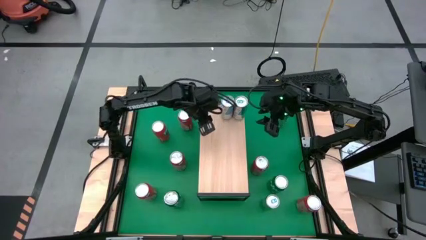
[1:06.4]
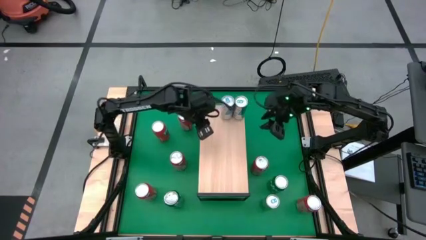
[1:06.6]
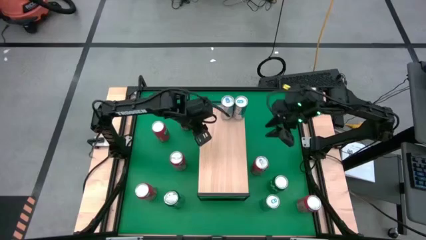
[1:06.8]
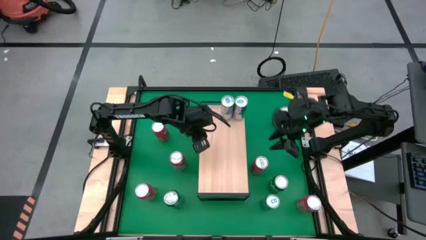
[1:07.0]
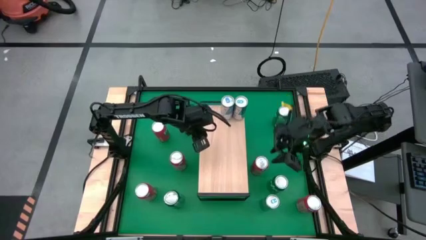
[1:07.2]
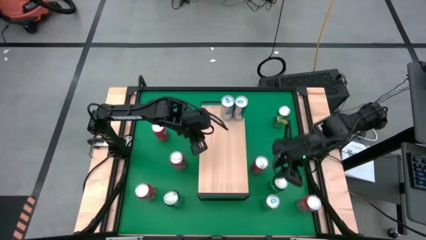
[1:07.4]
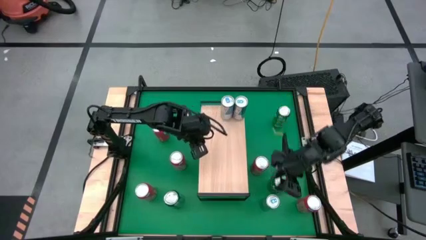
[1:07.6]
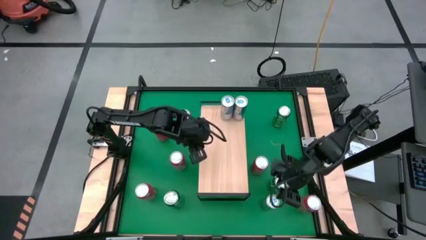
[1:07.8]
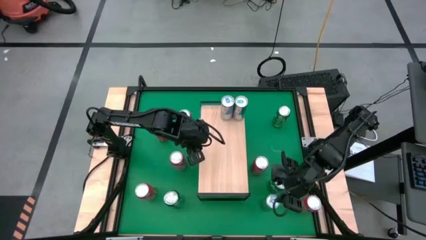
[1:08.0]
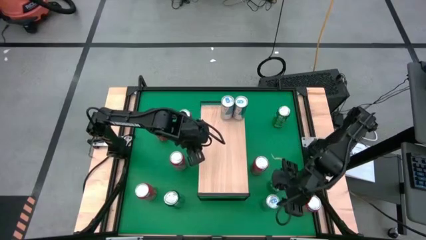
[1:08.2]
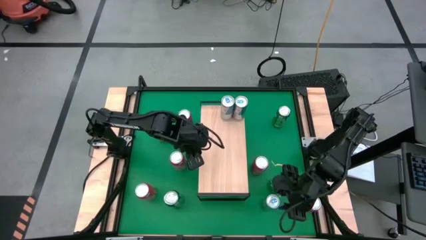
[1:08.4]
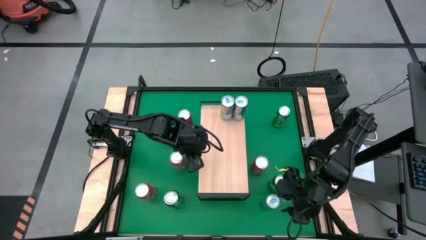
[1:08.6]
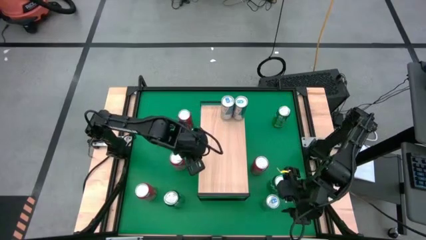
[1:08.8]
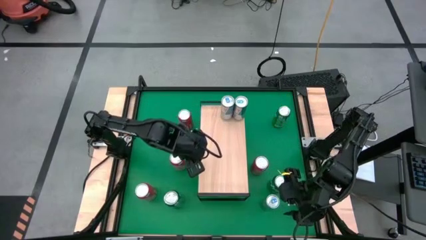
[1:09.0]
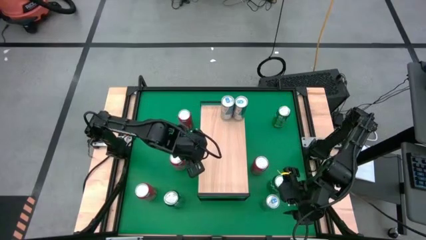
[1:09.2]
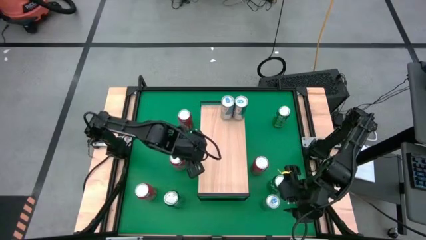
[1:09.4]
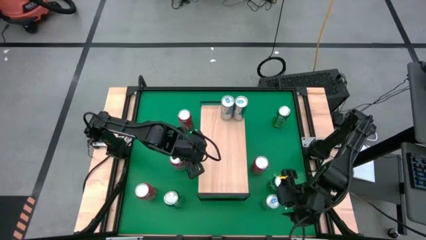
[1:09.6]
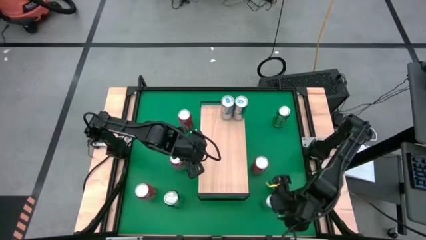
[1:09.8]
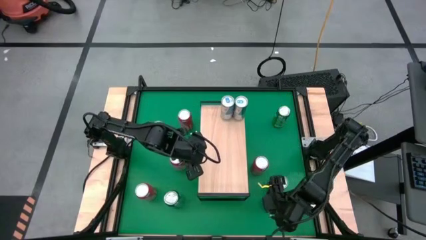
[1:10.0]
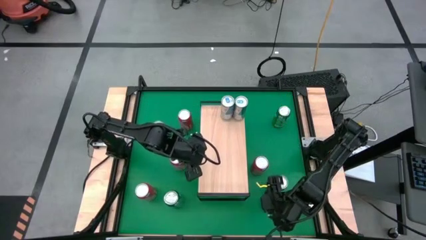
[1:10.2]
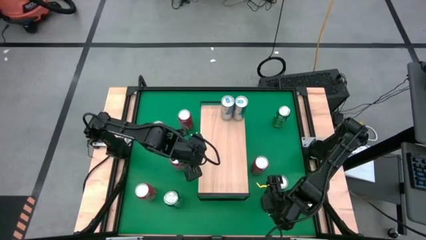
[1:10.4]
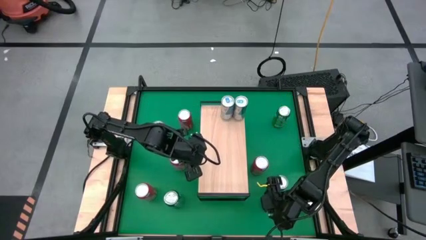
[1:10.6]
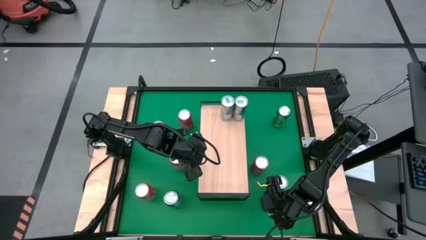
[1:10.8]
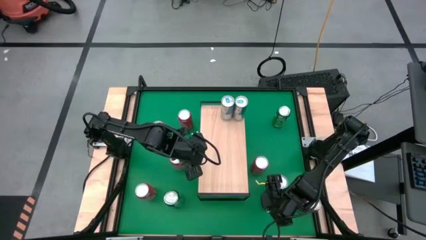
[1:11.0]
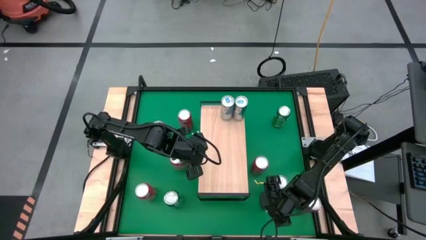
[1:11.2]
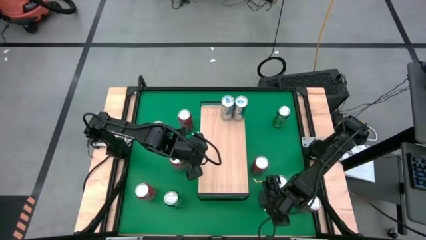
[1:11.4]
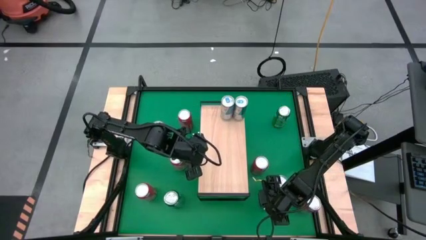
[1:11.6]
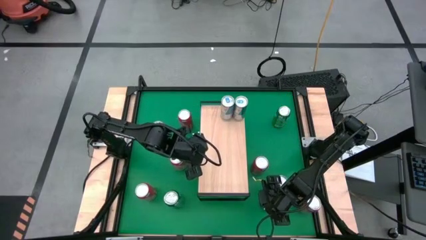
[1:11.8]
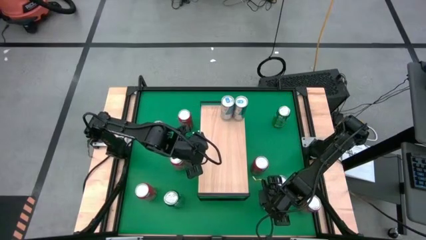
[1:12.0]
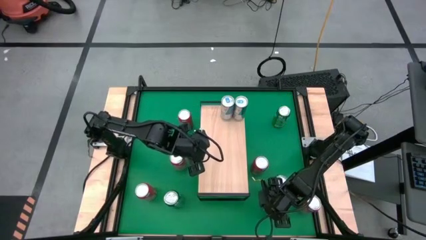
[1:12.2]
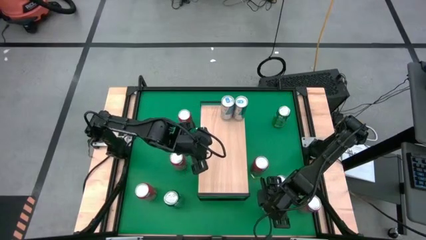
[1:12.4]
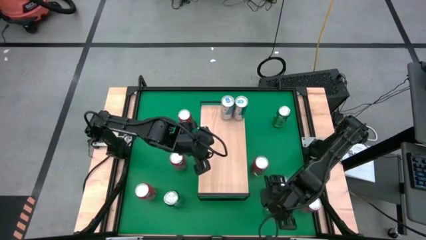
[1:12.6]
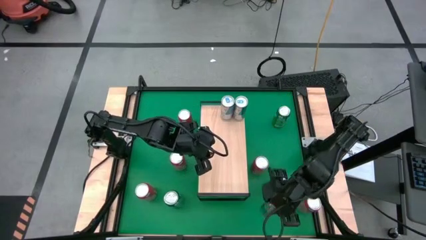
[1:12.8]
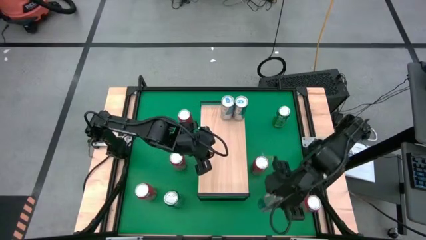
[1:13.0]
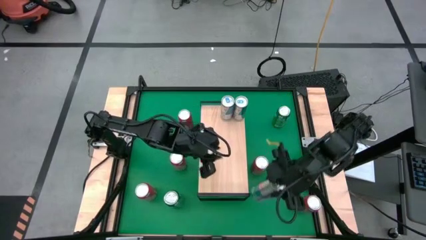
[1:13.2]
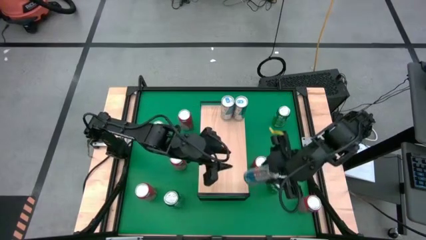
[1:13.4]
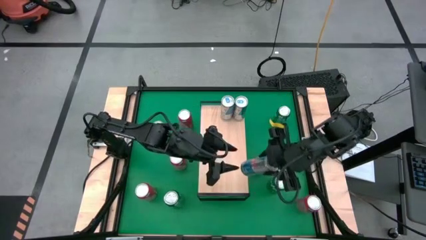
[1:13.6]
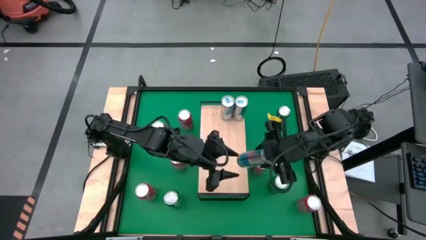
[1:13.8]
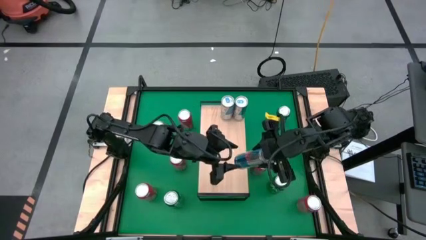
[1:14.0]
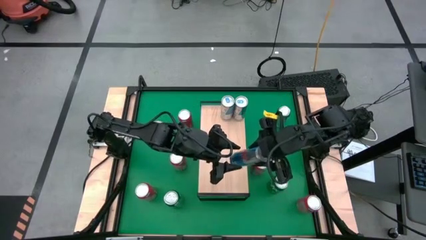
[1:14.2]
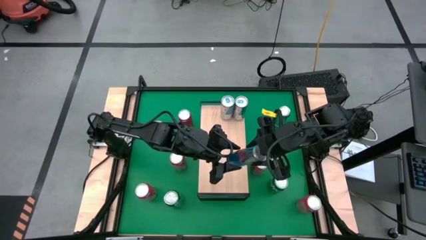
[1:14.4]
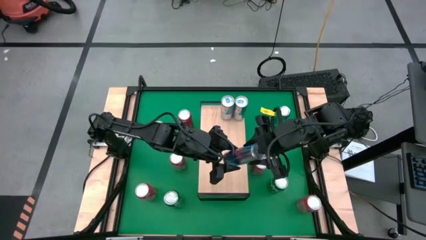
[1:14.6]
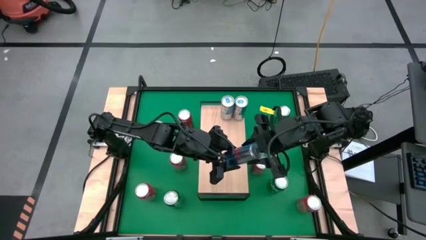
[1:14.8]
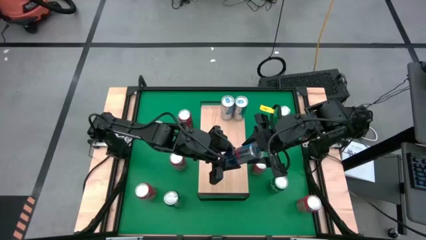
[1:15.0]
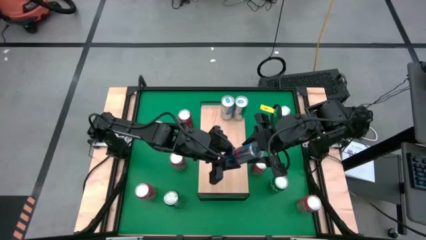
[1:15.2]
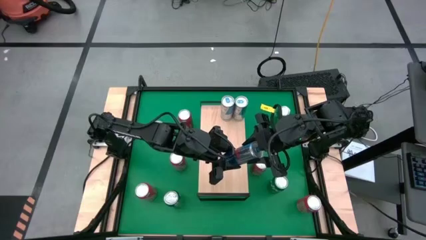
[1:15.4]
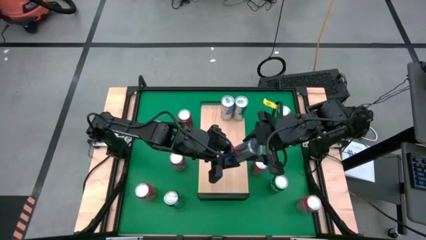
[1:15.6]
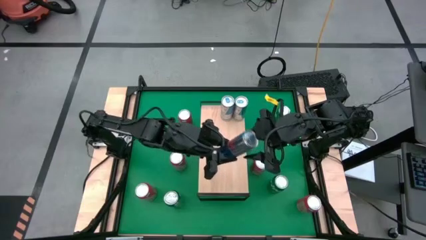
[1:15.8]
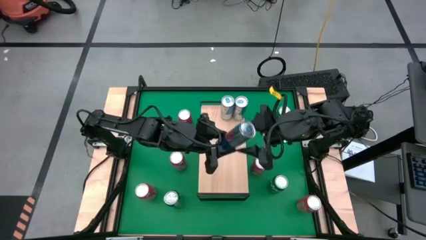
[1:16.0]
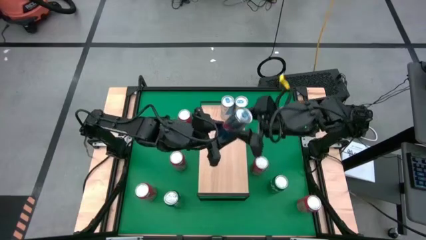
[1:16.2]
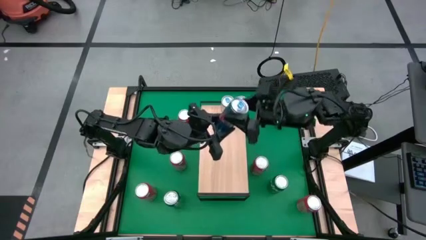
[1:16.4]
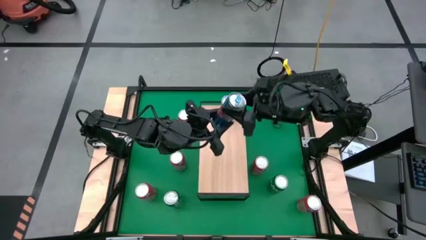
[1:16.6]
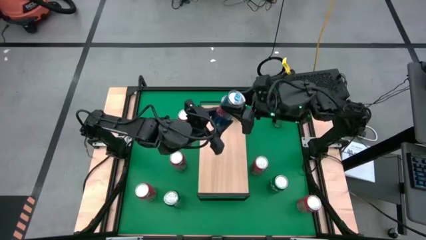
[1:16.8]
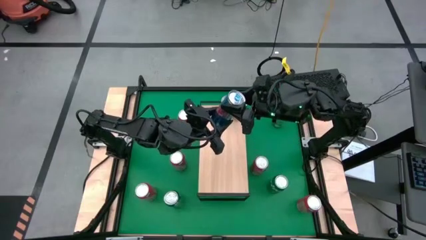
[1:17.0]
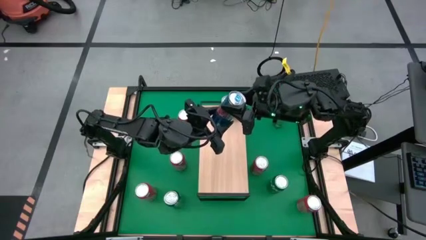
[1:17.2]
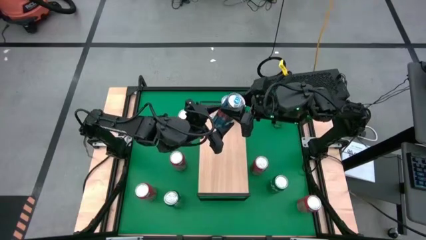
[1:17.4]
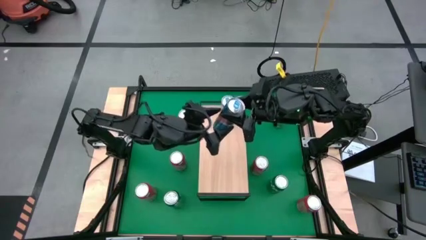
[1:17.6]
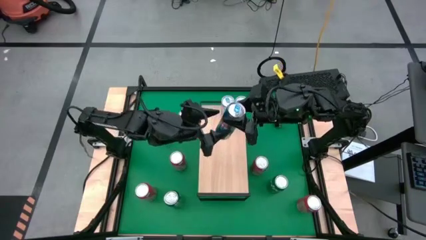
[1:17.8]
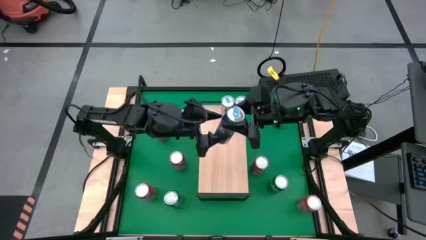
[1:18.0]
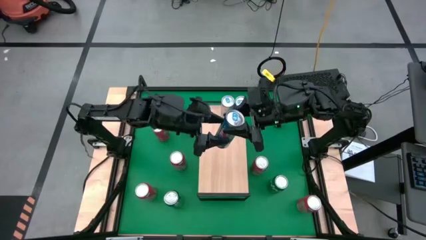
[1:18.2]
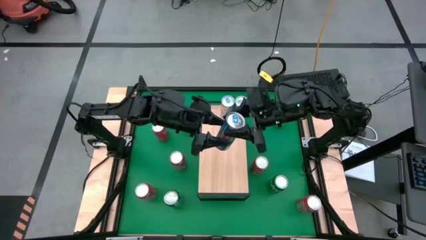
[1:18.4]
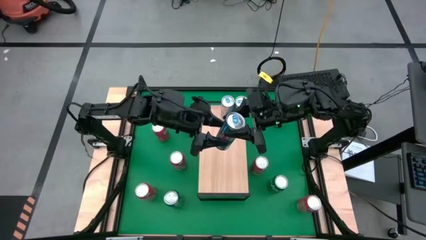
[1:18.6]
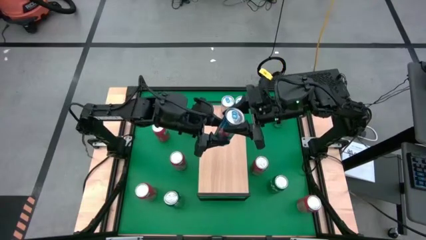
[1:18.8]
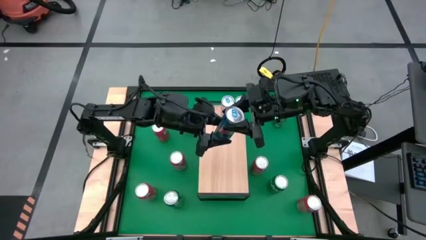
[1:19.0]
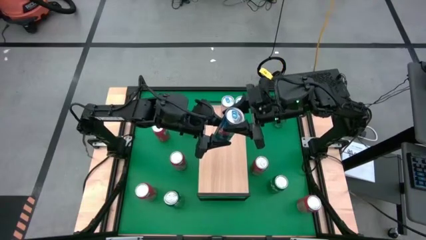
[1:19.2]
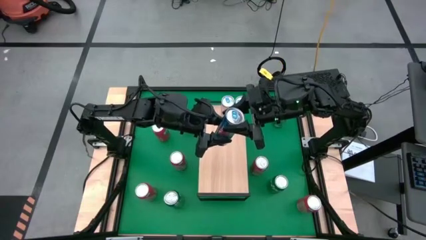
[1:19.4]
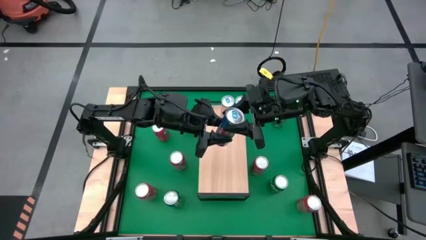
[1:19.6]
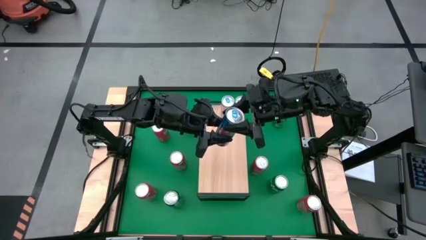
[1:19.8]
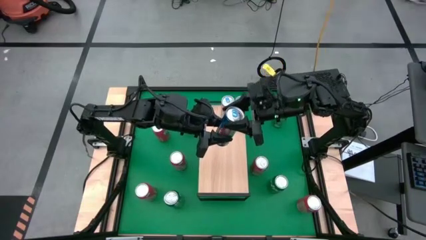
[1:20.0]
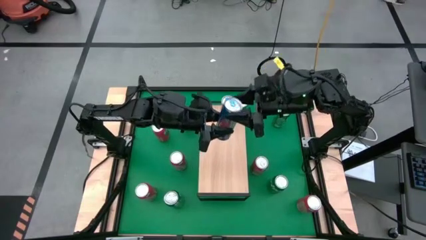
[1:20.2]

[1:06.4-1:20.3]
Task: Place canned beverage on shelf
Put the blue soda can on the shelf aligned with the other blue soda can

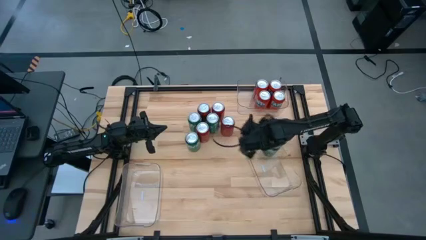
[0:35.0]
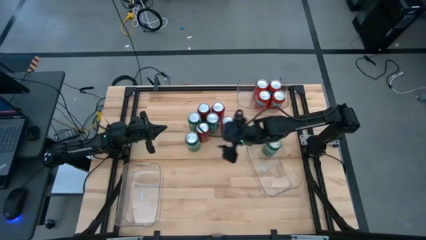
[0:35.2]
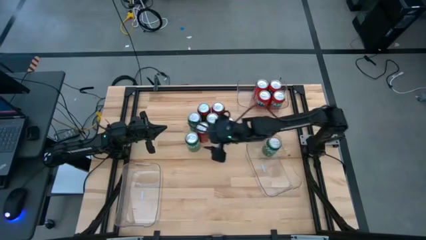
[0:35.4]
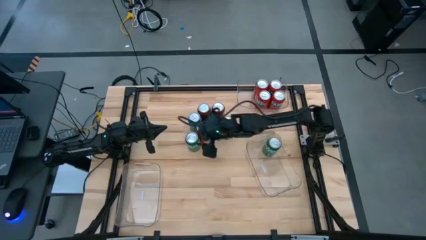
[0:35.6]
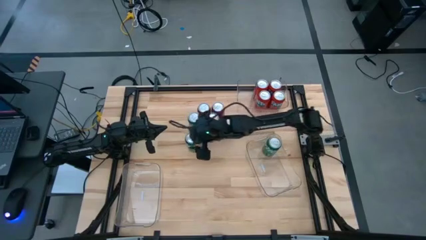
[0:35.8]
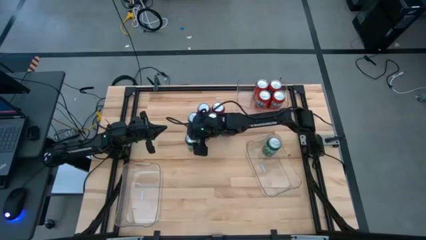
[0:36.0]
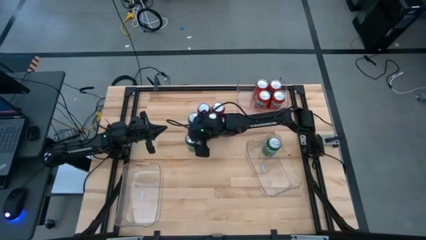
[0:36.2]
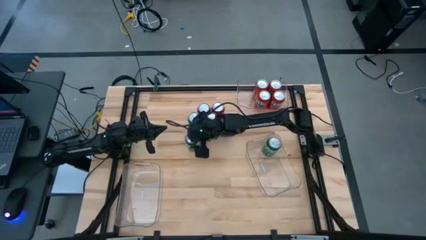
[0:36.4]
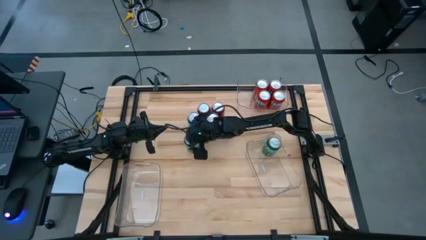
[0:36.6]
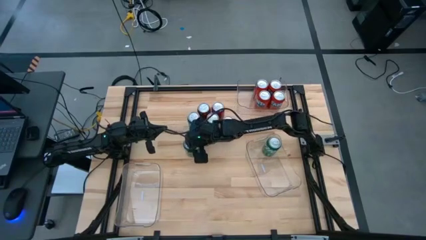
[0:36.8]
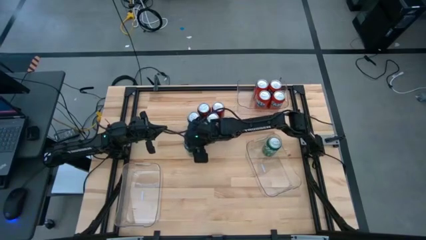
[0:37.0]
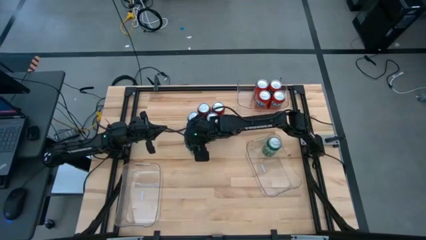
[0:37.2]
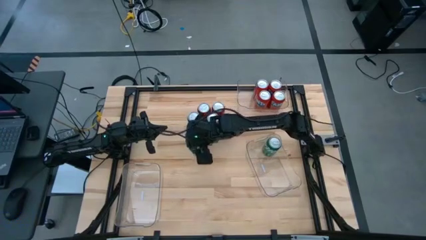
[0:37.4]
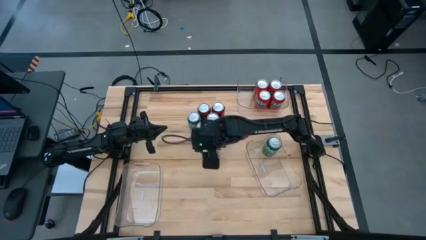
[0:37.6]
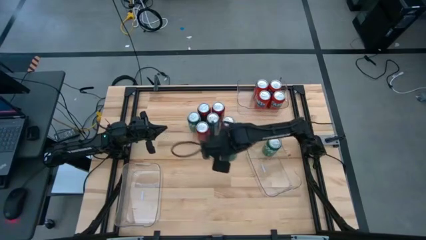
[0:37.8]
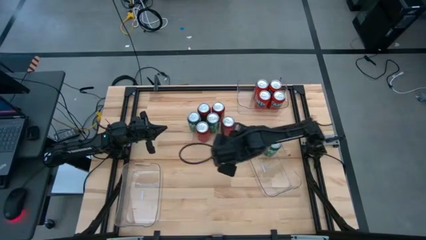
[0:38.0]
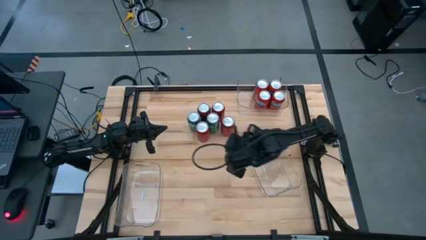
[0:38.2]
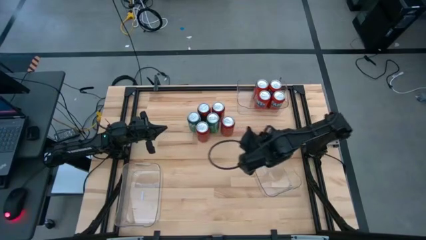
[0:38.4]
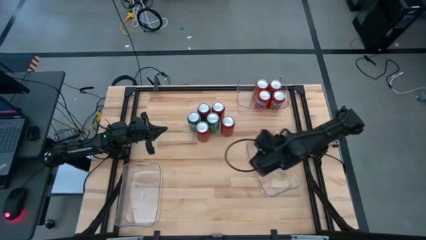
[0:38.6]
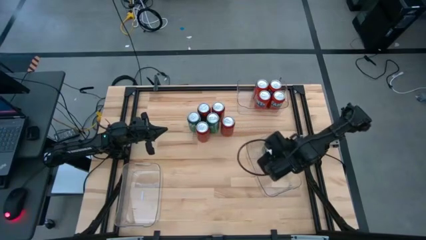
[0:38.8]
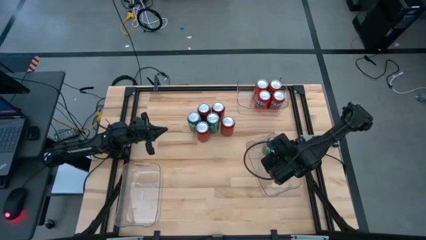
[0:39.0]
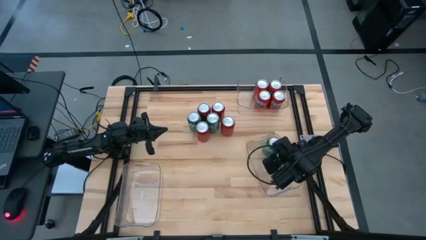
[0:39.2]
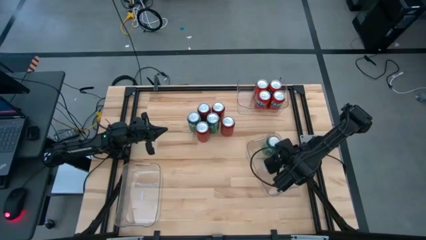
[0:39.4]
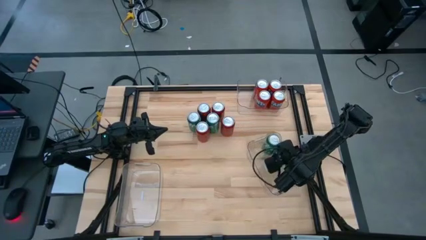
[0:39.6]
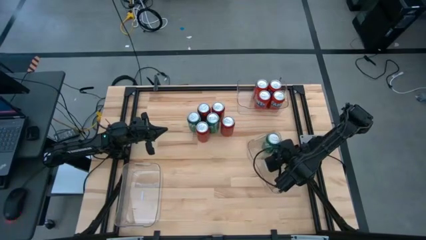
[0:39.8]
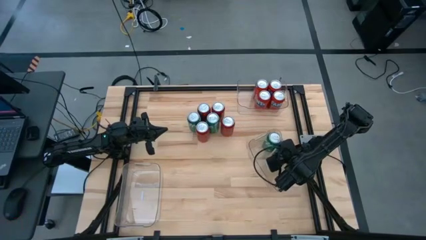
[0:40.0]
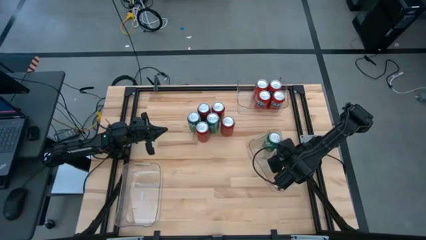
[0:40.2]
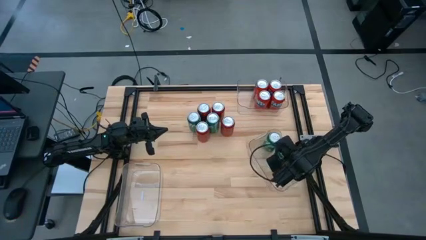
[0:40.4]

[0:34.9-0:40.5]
Task: Sort soda cans
Put the bottom green soda can into the bottom right transparent bin
